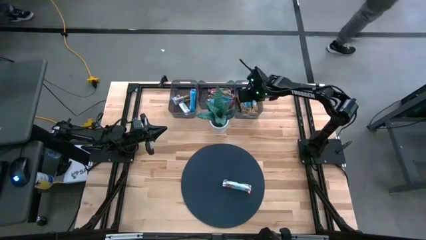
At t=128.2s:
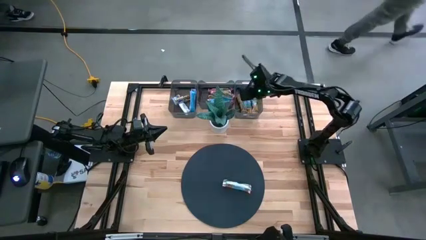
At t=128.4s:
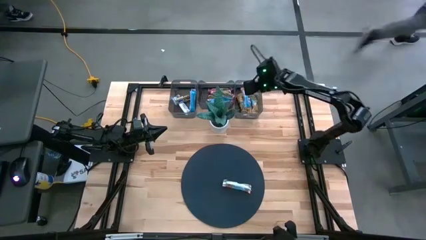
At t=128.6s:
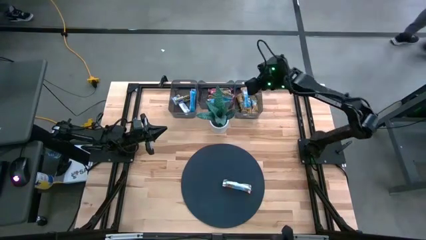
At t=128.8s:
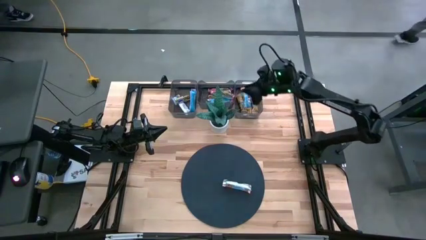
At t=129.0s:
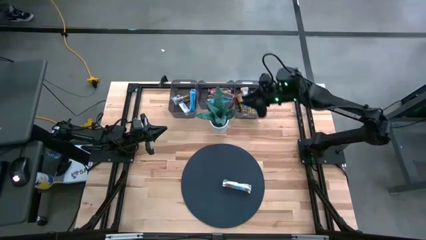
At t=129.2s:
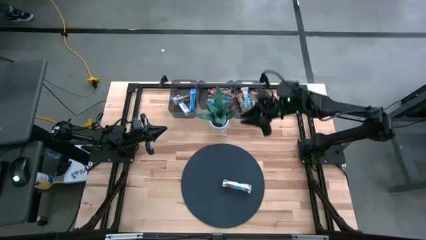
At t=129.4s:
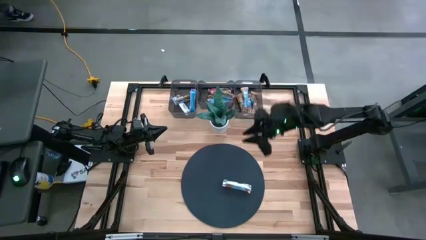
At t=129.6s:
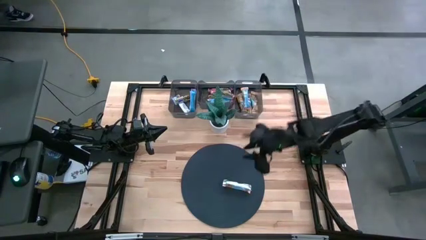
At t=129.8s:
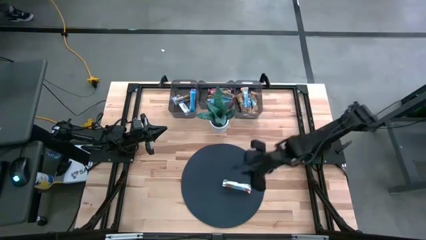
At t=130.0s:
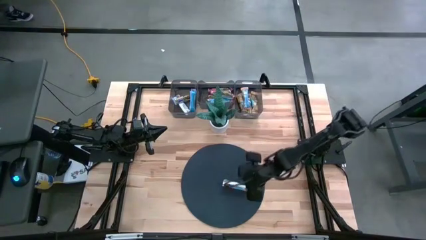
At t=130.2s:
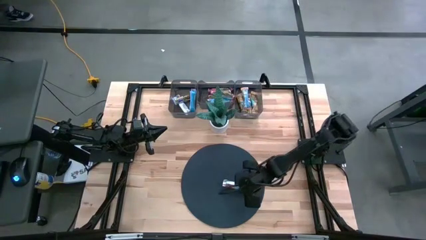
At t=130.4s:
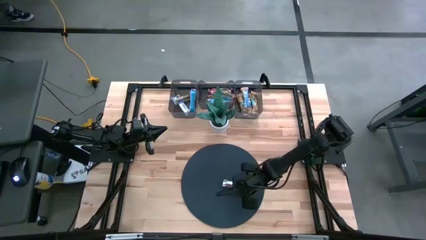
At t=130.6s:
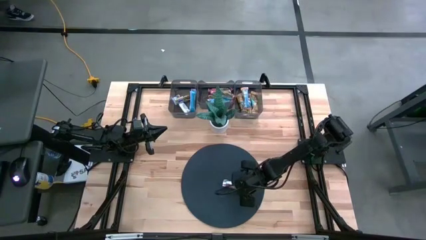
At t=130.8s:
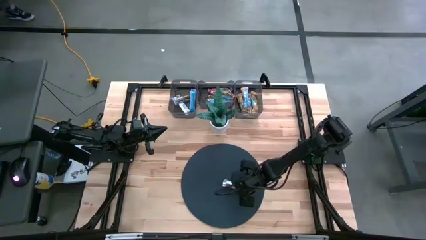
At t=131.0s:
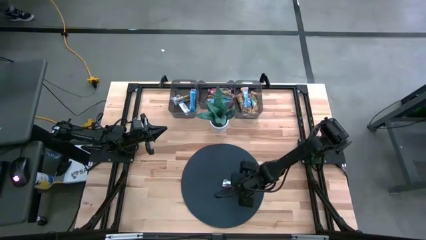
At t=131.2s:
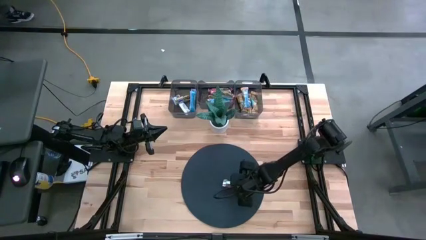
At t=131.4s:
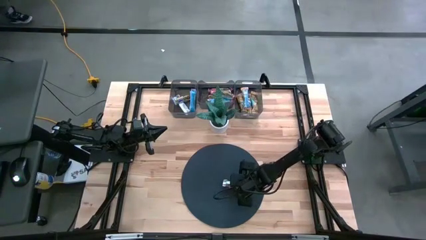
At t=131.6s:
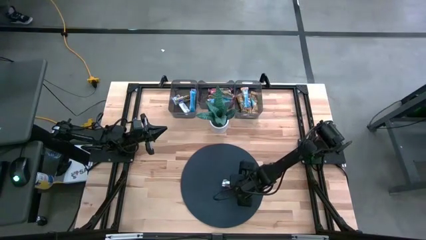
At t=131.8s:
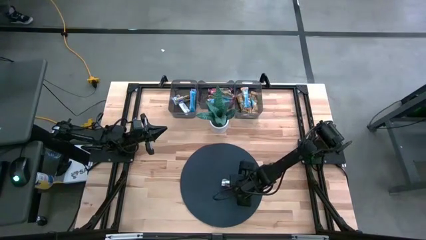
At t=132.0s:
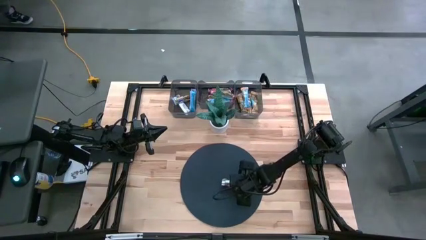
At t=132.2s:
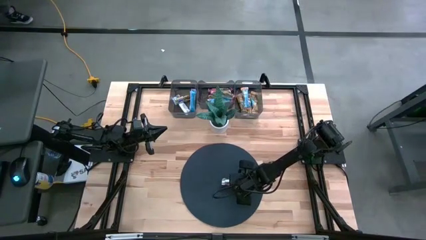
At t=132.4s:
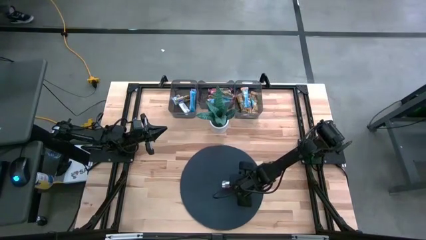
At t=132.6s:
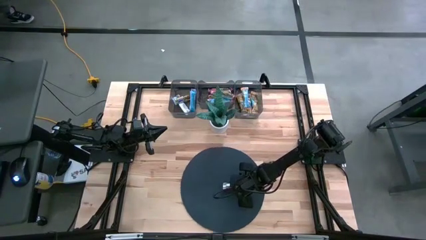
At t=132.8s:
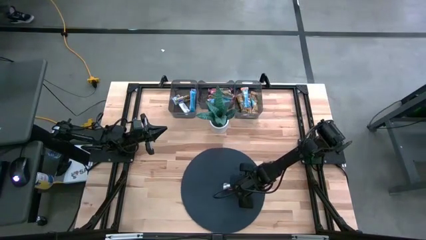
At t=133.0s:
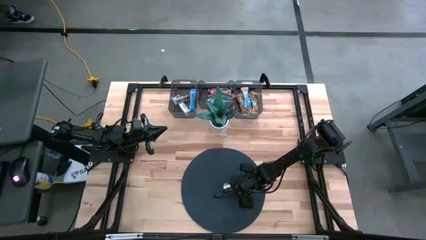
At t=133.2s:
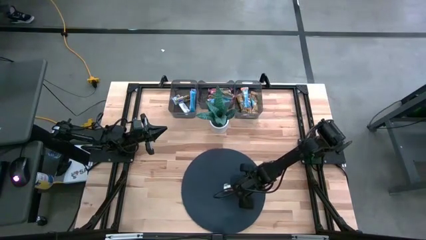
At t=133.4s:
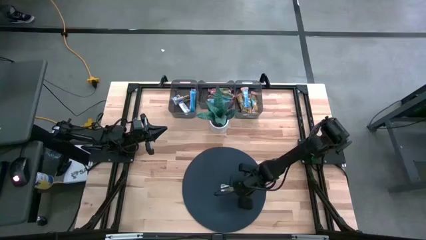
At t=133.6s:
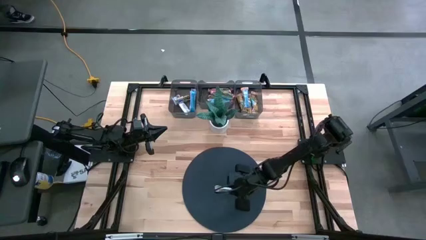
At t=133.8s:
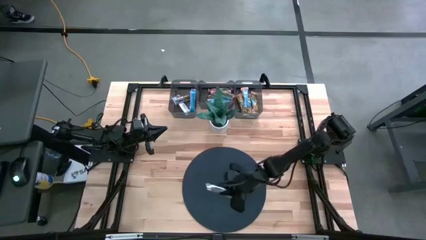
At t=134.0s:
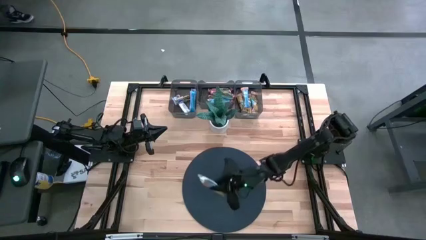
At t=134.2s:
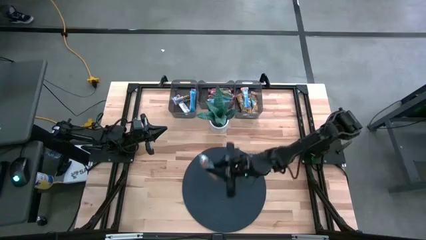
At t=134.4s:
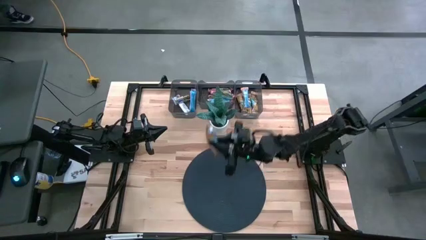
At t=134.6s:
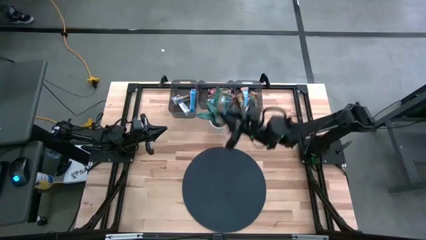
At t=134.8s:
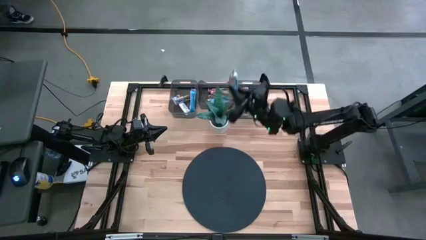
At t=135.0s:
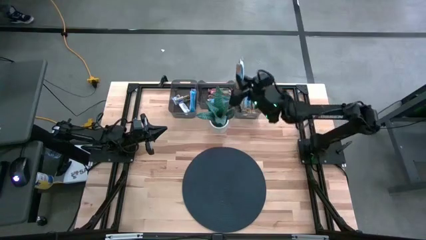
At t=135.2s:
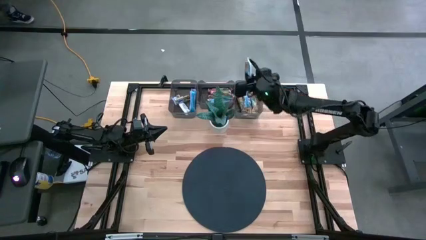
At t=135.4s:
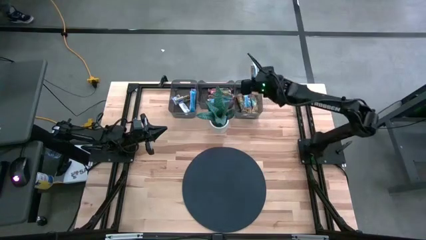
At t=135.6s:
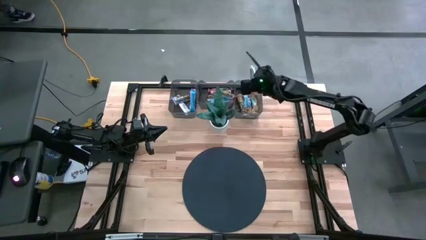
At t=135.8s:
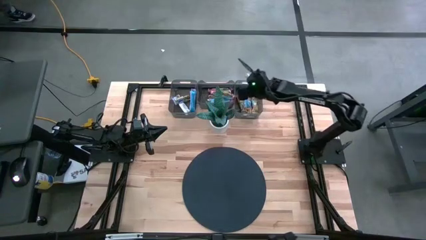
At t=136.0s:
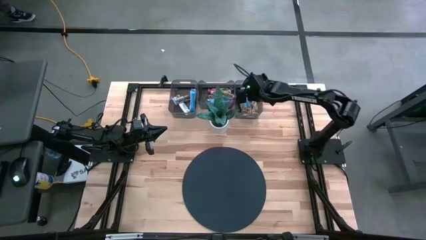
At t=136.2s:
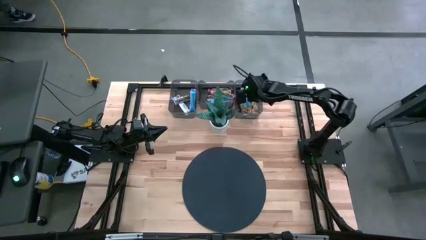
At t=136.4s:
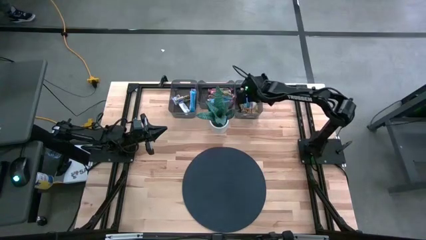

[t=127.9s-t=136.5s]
Task: Pick and place Granola Bars by type
Put the orange granola bar into the right black bin

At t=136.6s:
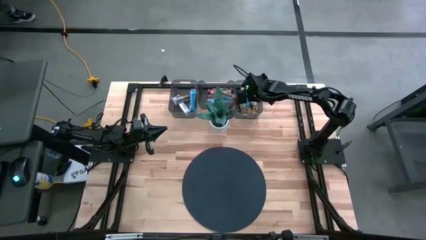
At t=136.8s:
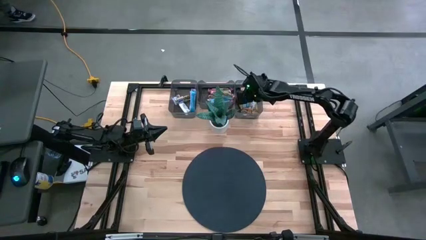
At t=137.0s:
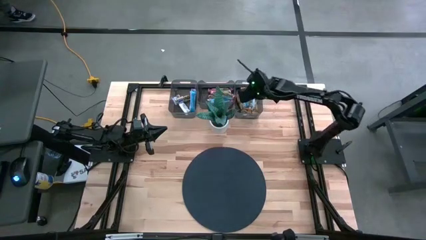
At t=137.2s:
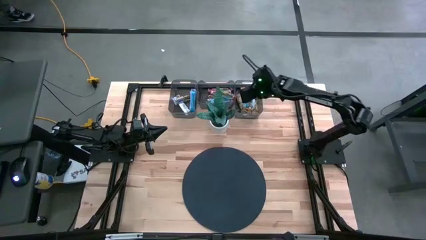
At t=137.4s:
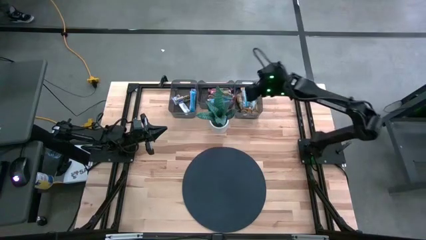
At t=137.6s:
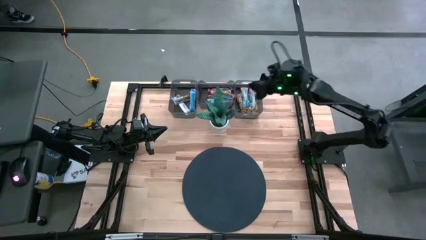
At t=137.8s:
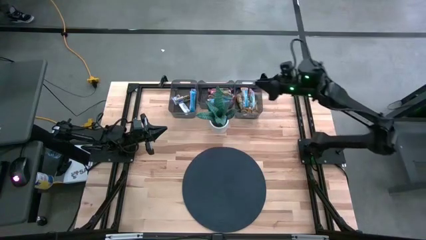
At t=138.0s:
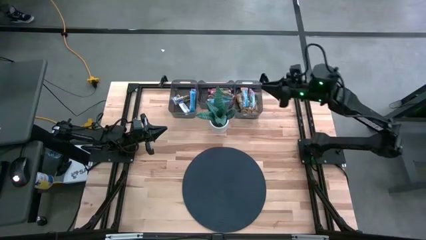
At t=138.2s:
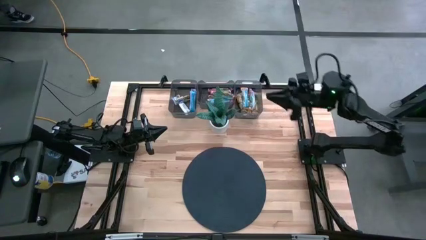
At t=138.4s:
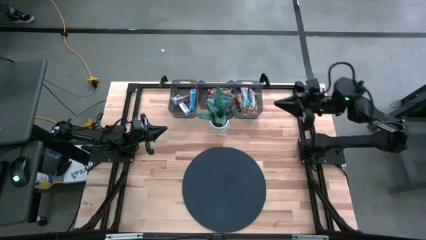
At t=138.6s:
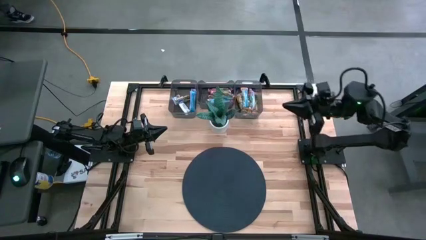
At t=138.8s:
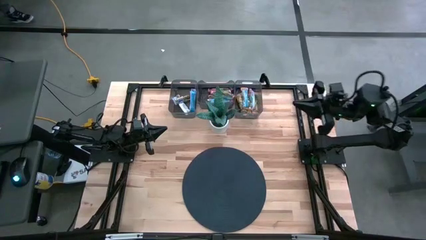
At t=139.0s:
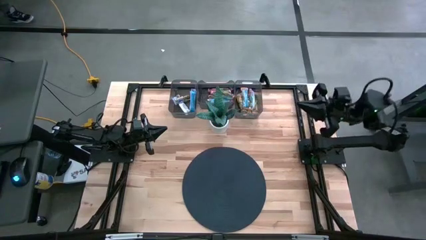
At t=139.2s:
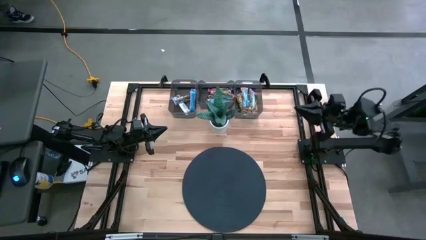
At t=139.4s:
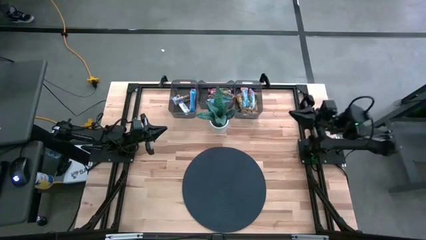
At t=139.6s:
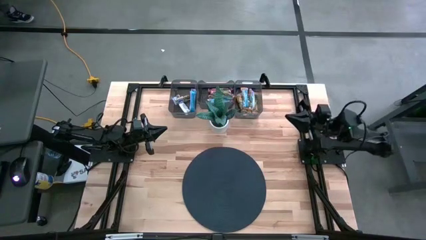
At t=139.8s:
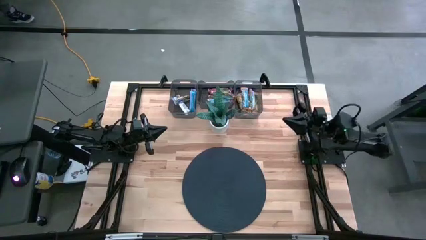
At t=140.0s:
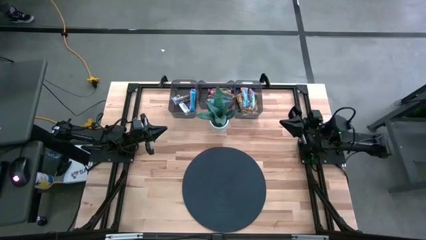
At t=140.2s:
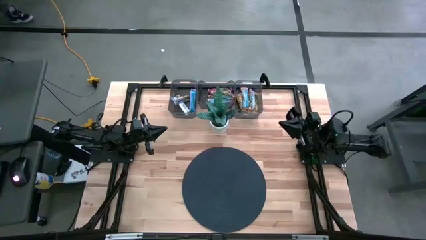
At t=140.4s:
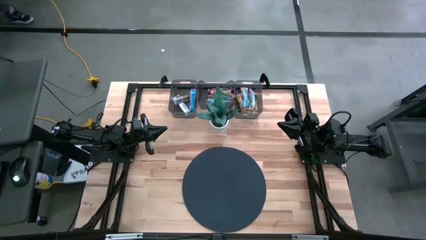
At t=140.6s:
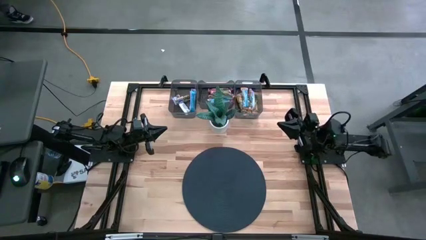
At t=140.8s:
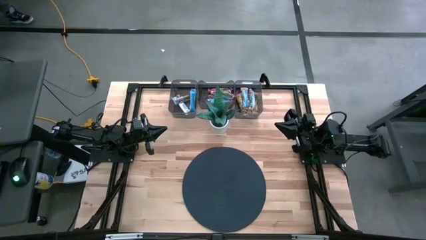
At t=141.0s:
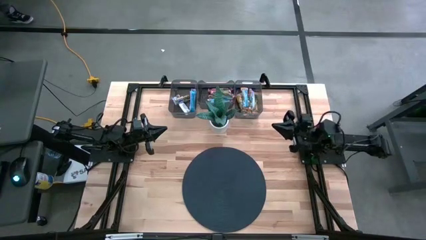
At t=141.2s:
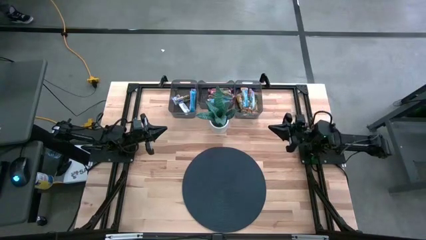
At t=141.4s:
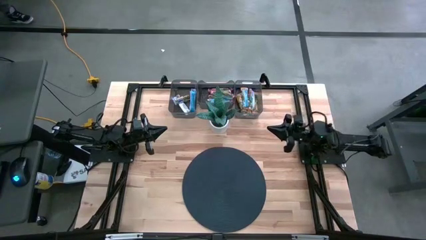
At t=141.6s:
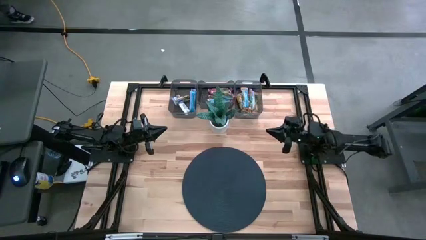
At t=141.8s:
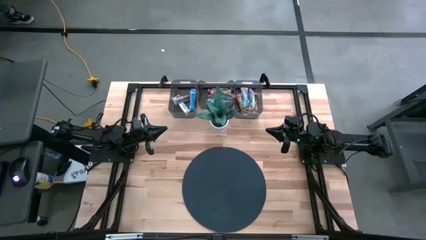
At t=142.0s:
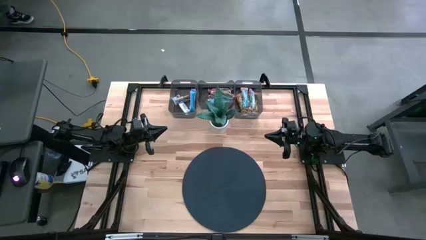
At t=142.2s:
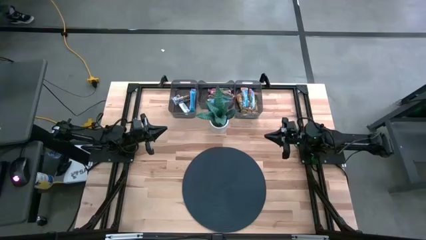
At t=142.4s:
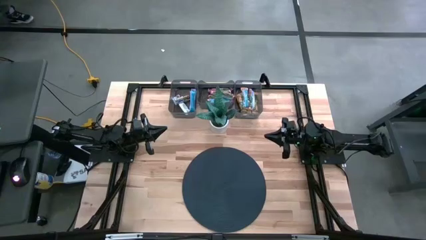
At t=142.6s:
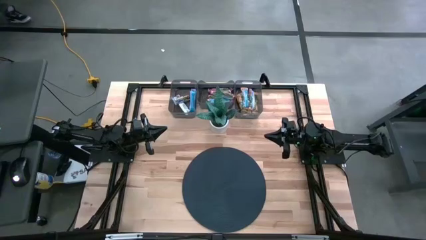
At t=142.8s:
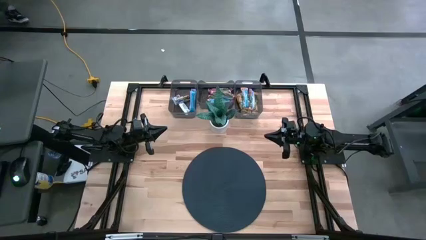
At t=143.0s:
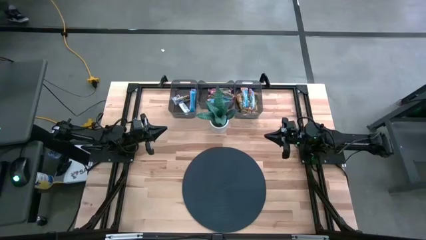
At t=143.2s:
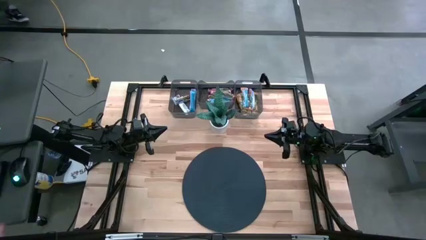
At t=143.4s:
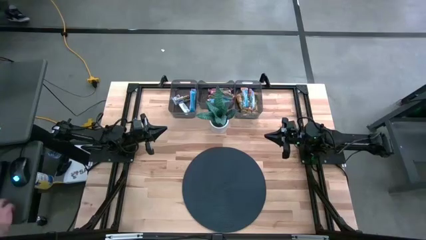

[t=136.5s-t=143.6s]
Return to Home Position

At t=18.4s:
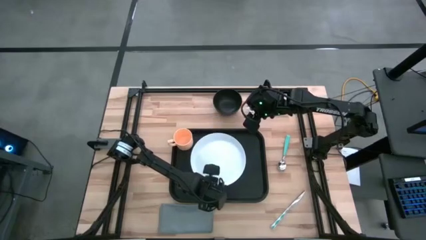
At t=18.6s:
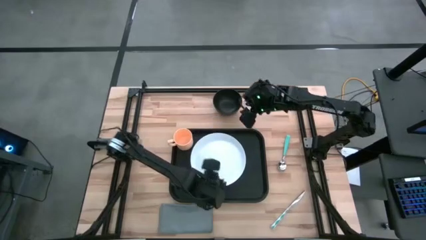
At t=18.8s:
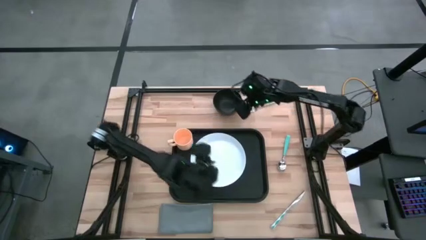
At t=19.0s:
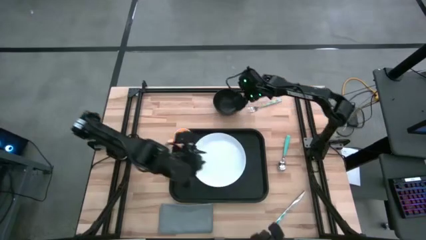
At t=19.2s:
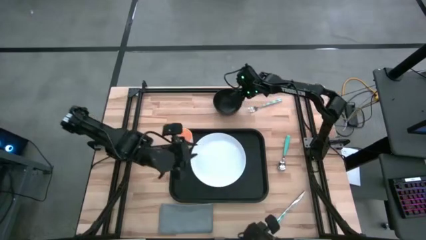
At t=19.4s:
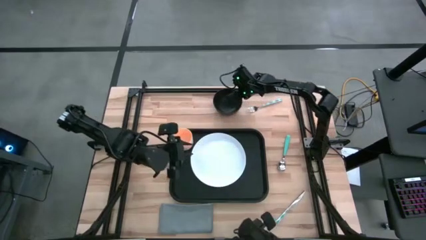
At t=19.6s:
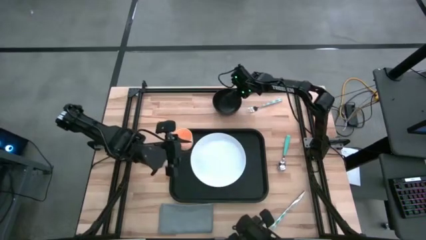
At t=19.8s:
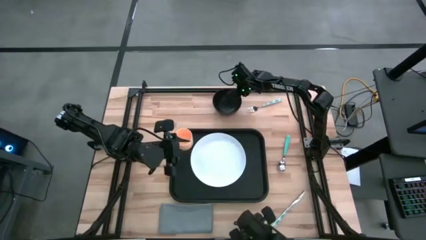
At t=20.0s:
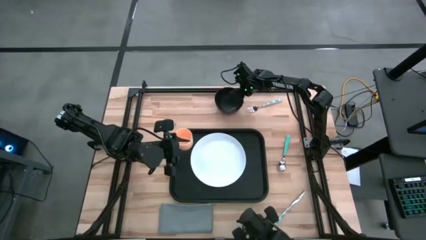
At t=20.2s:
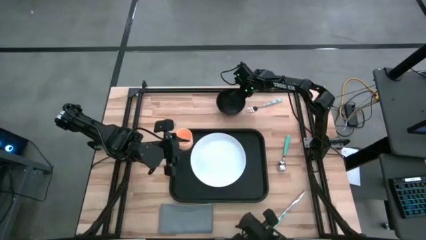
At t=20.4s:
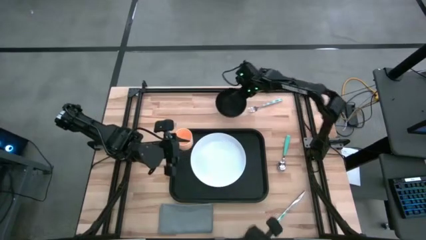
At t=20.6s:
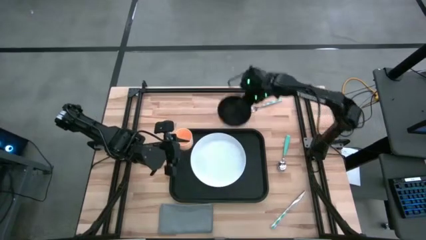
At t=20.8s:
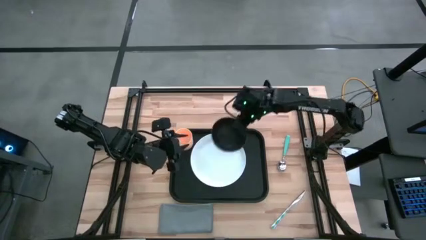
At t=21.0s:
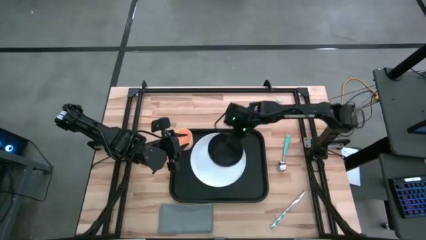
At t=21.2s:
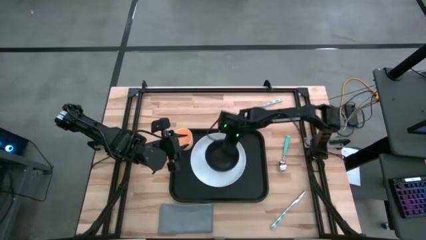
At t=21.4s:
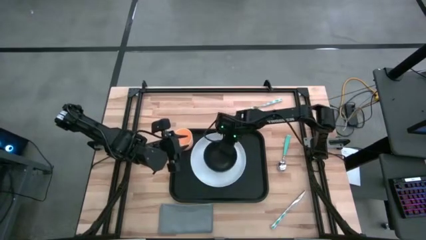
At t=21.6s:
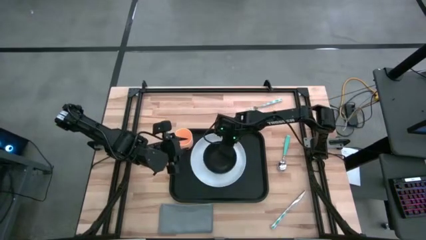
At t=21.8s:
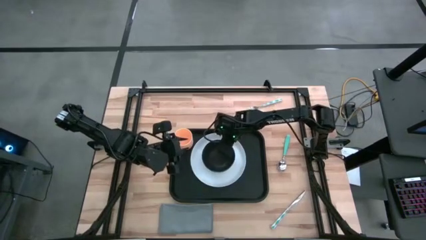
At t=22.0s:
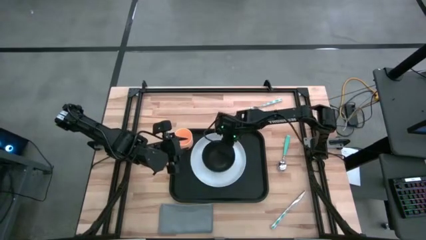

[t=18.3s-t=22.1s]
Task: Set up tray
Put the black bowl on top of the white plate on the black serving tray
